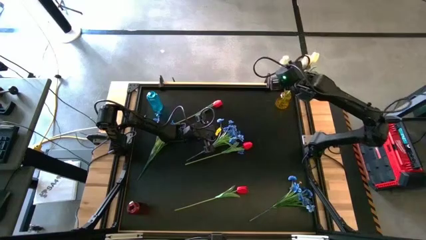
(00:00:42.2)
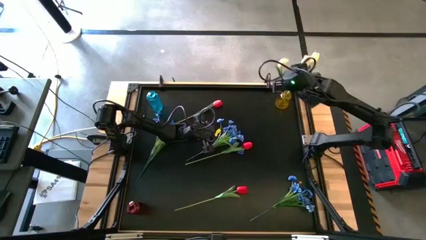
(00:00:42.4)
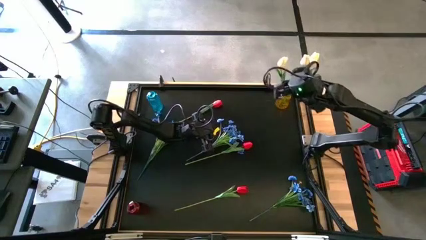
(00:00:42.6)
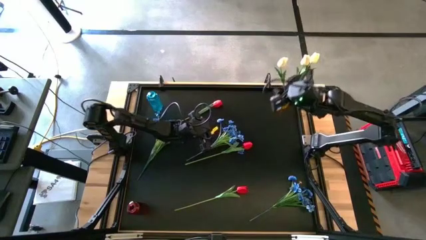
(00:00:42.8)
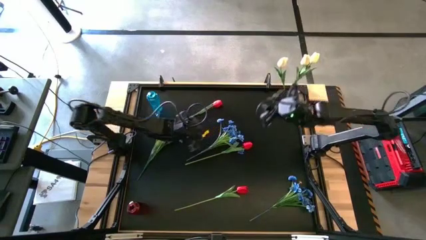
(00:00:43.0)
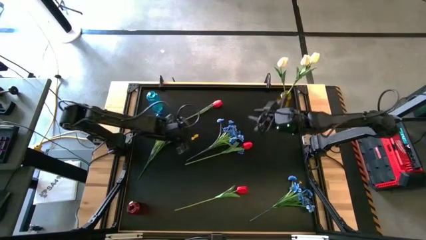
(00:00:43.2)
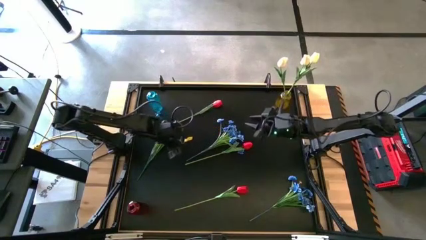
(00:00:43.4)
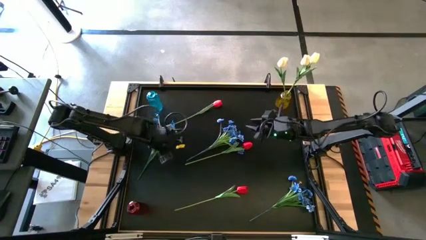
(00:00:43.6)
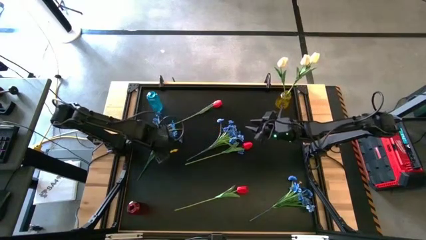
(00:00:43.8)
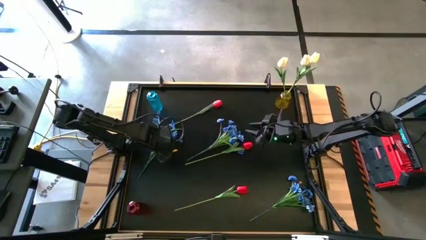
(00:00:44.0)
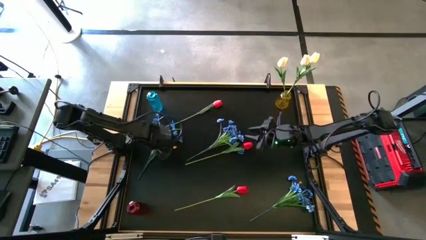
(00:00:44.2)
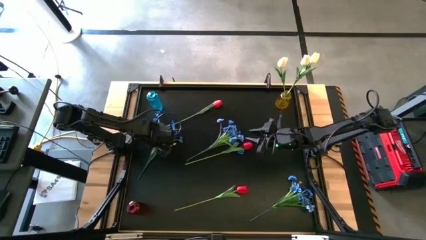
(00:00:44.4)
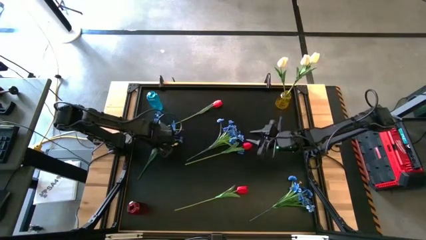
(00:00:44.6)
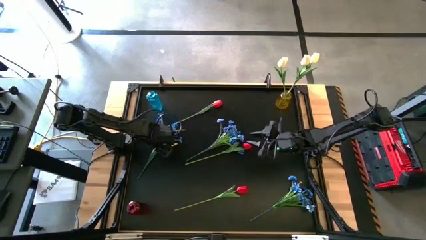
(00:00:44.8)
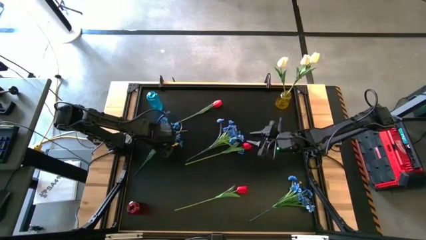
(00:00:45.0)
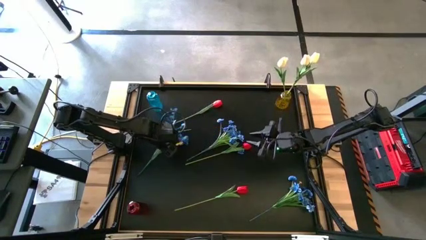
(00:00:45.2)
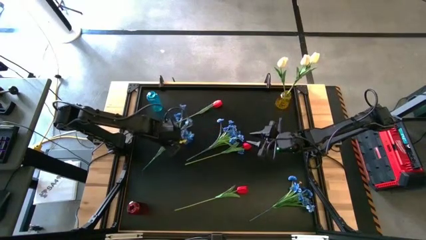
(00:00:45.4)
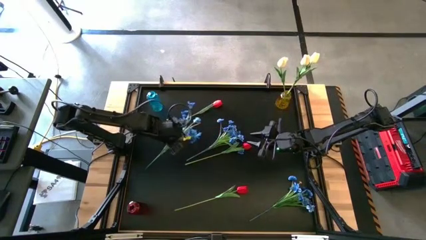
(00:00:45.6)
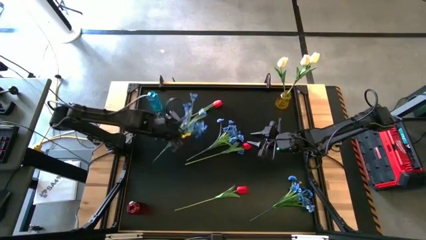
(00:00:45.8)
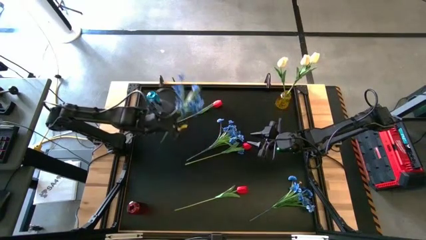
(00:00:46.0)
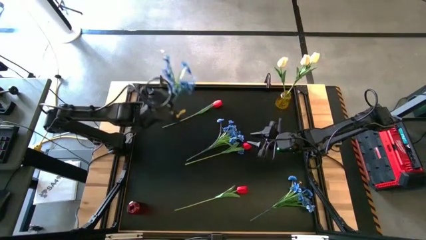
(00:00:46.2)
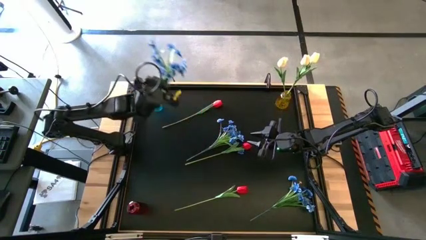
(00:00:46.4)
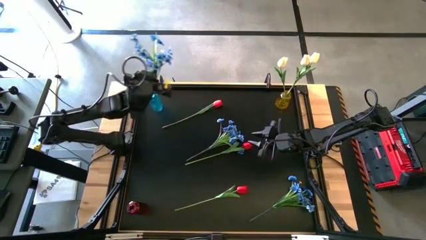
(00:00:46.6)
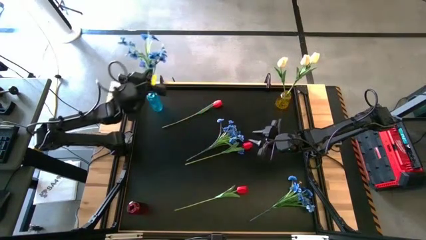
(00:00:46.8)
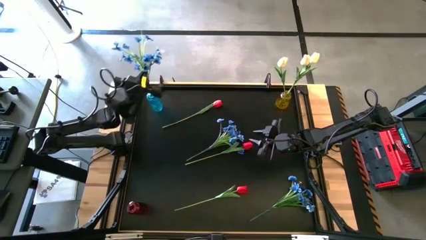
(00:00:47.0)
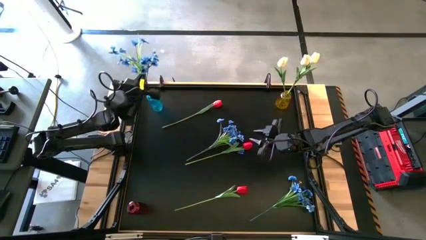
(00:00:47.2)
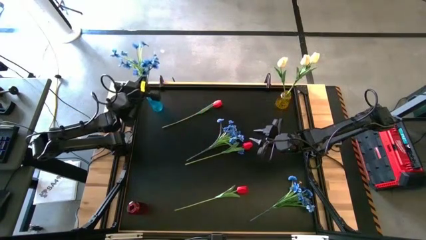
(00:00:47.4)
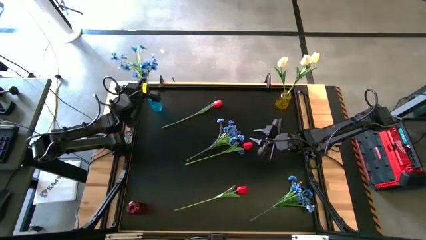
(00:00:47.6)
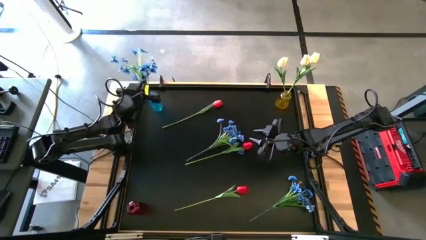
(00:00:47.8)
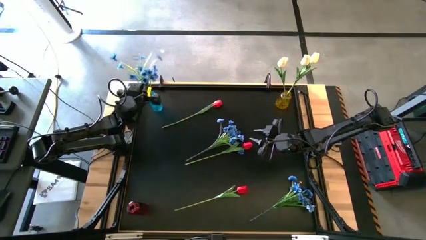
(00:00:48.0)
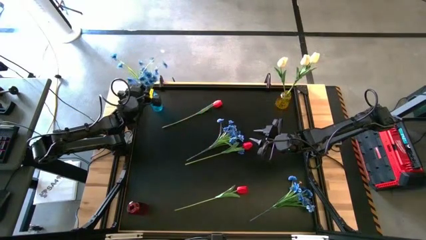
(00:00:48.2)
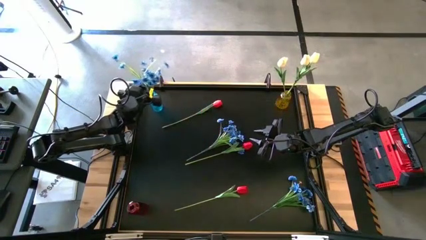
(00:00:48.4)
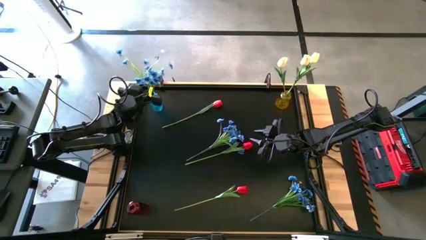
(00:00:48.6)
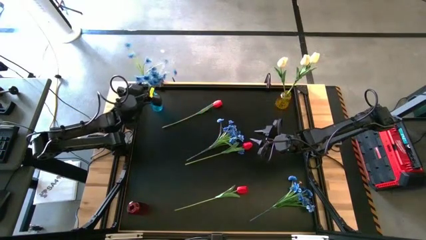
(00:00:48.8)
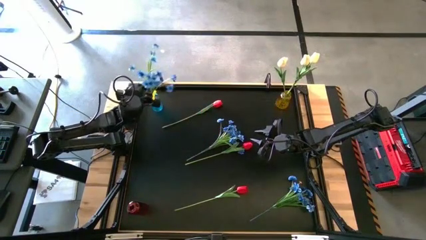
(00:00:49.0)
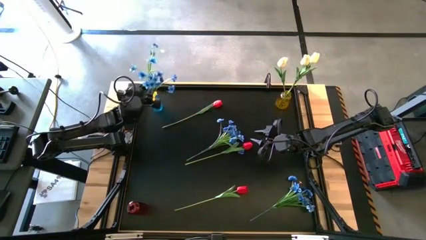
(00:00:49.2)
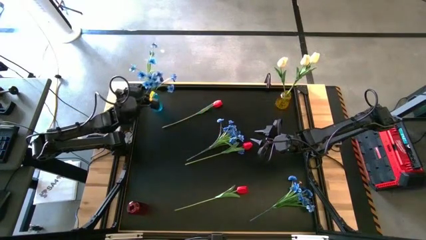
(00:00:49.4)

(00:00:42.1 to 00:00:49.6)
Task: Sort flowers into vase by color
Put the top left blue flowers into the blue vase

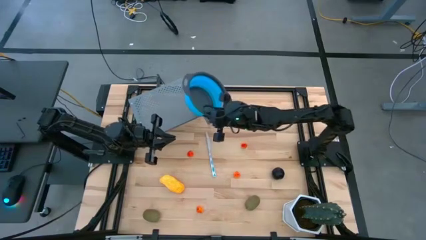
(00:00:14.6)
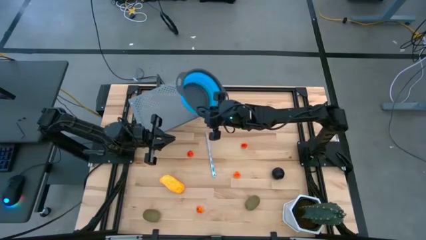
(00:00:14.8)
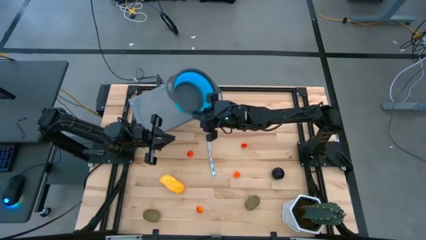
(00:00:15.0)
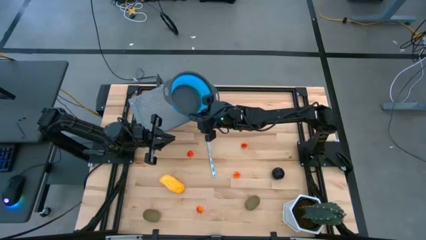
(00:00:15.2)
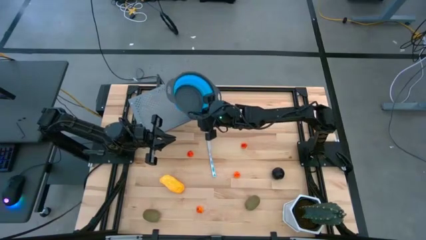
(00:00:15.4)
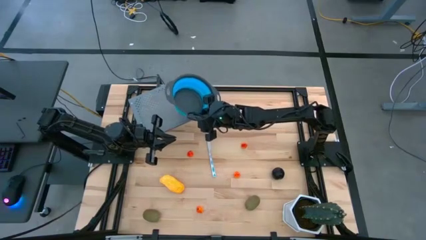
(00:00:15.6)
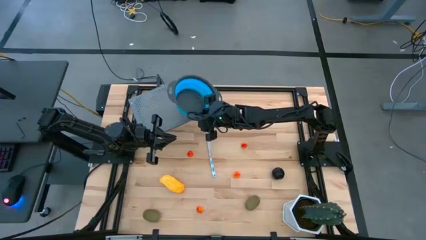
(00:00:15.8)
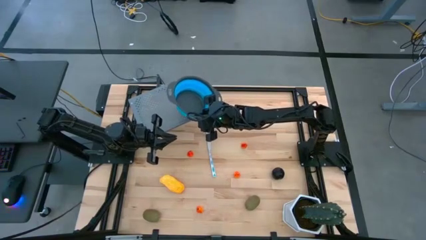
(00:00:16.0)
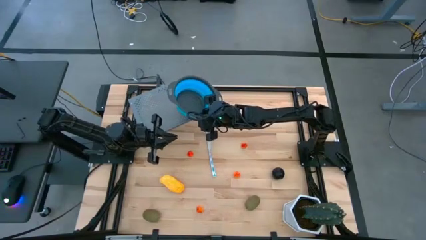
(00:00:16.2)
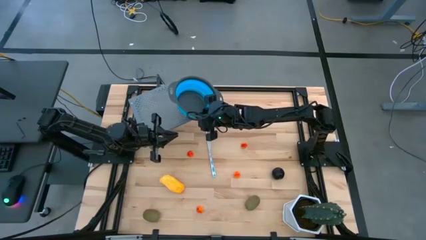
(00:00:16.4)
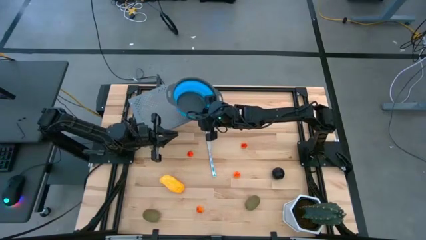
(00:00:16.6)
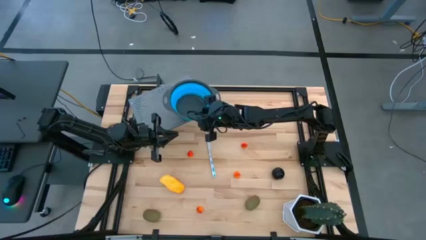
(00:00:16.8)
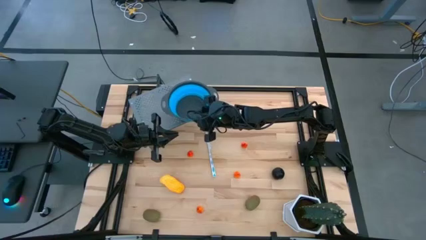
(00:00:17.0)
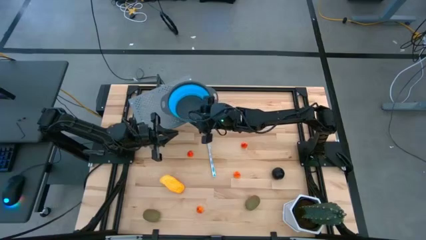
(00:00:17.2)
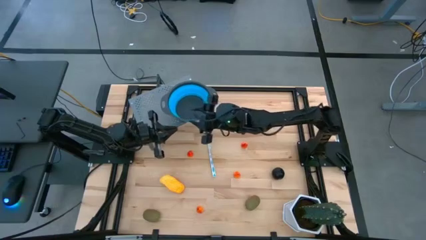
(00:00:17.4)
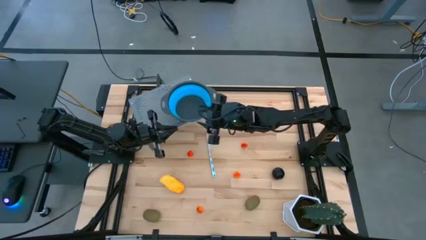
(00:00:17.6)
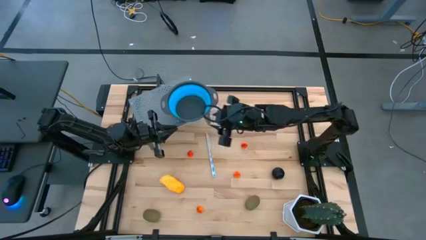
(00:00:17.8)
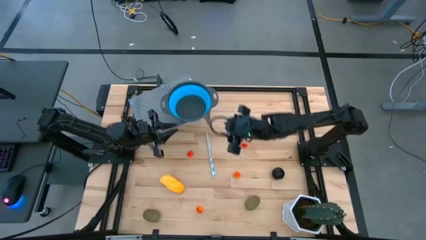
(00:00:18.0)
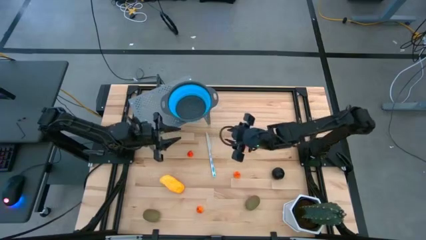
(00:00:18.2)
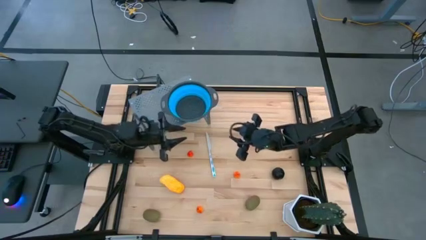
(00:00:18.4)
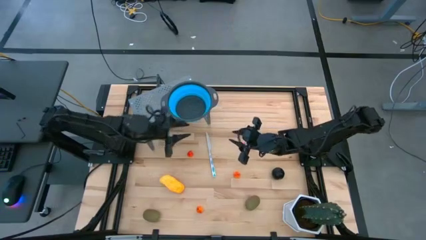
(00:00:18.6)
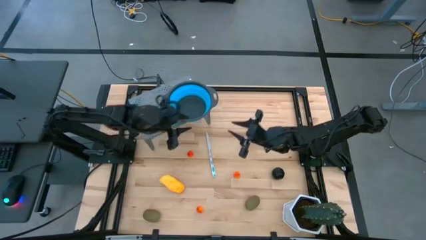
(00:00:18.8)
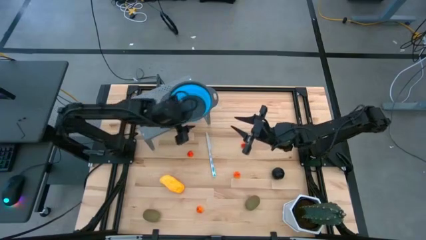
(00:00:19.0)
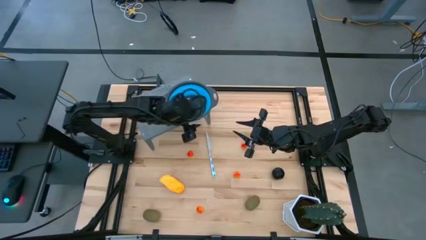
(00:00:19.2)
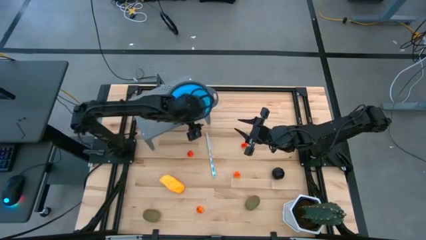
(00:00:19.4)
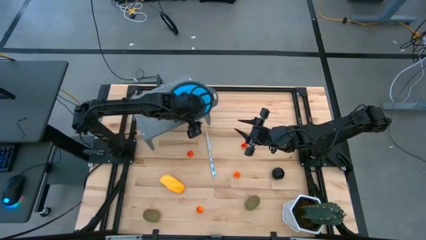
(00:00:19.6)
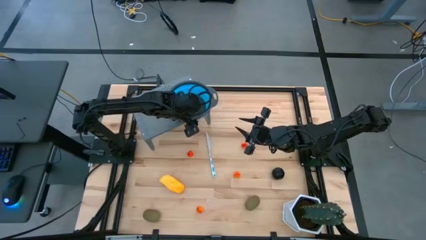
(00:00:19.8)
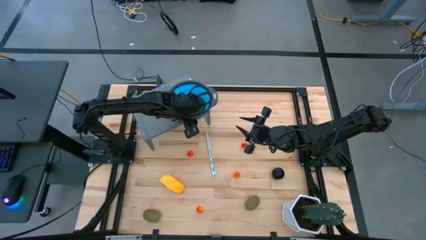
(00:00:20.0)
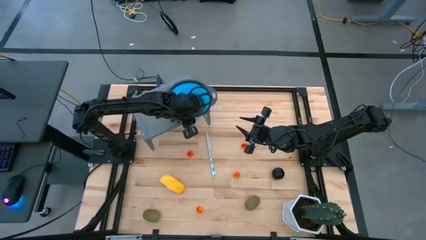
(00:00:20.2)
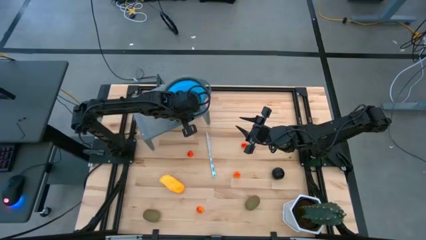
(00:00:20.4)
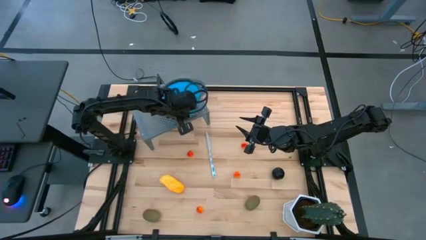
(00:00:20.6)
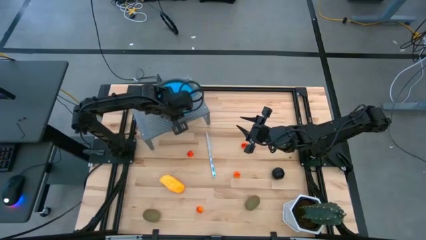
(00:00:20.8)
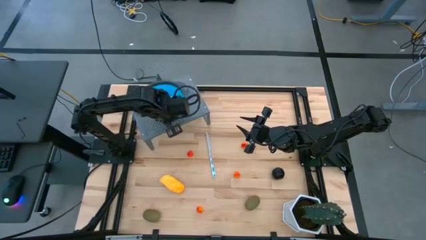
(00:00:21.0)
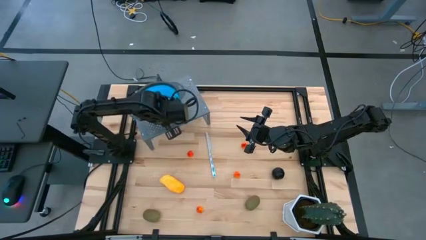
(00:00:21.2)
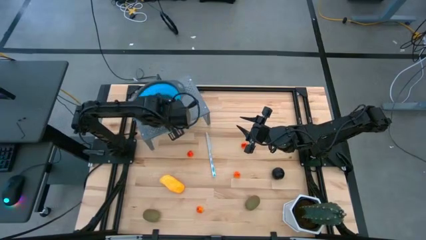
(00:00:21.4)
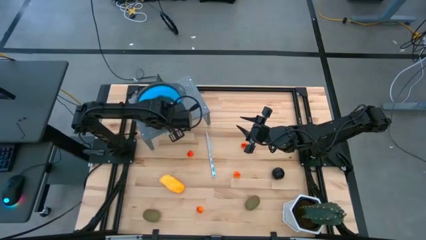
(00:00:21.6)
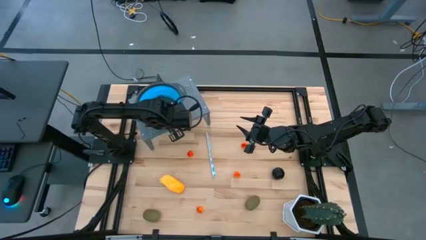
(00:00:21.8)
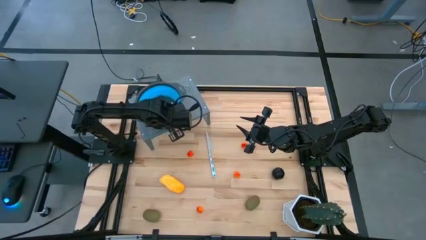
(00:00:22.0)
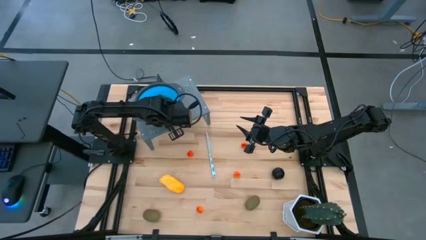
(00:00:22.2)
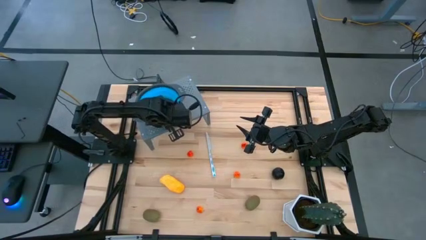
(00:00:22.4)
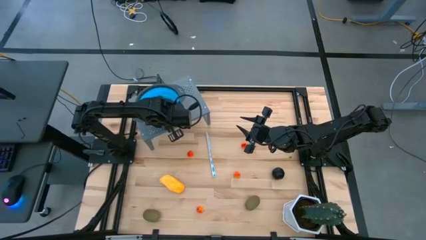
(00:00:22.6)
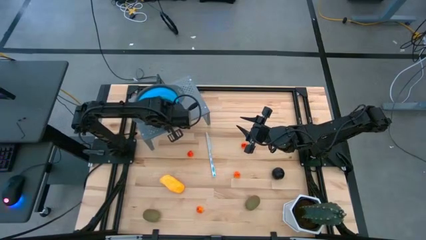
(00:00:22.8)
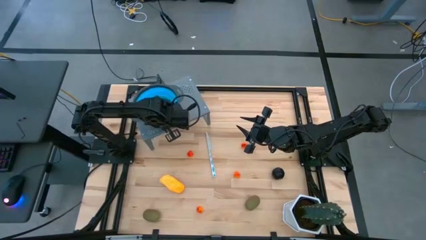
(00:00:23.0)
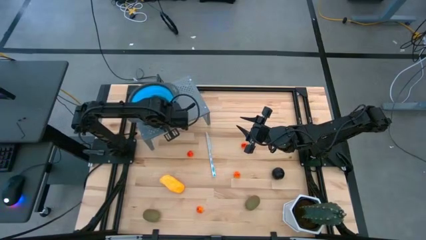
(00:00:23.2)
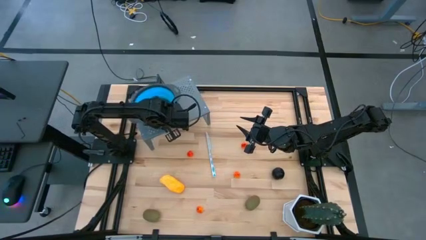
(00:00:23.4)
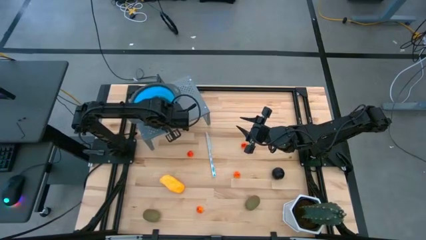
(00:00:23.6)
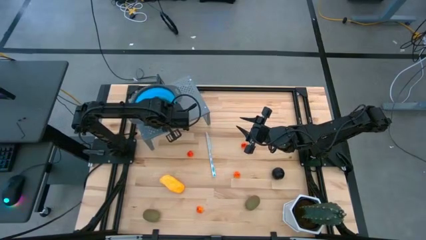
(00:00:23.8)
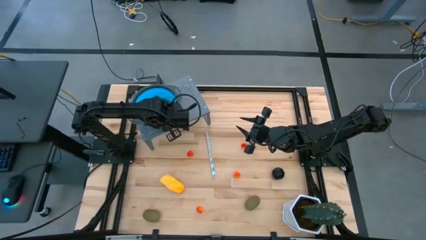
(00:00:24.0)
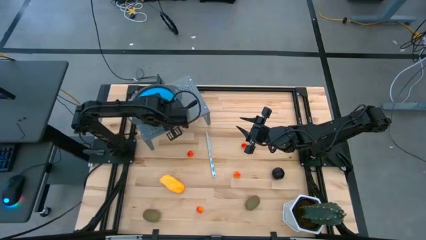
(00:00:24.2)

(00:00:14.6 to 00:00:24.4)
Task: Pick & Place Fruit
Put the blue strainer bowl on the shelf
